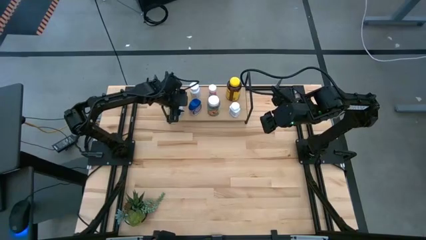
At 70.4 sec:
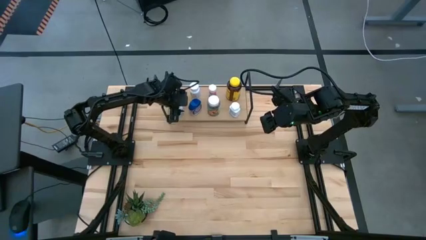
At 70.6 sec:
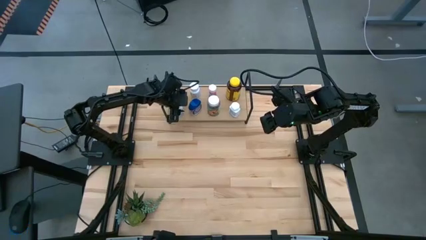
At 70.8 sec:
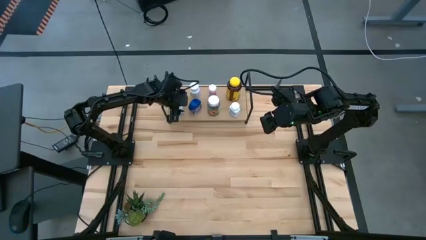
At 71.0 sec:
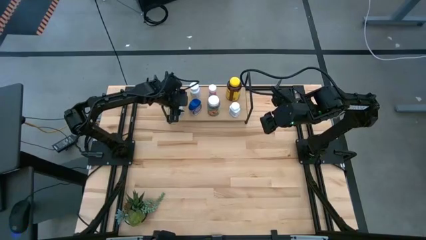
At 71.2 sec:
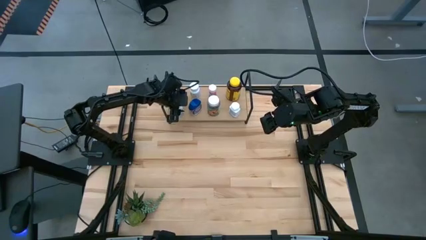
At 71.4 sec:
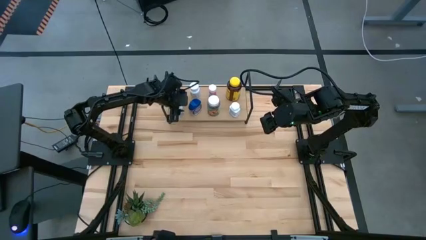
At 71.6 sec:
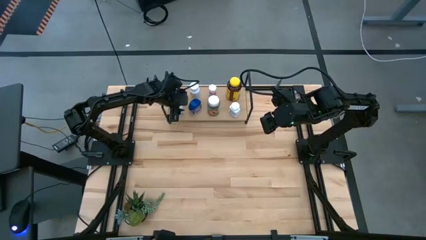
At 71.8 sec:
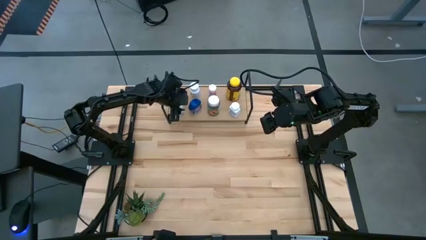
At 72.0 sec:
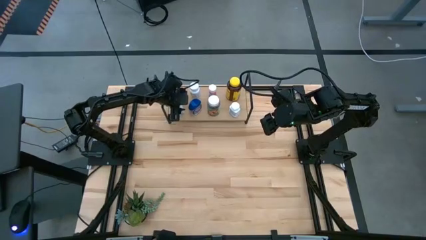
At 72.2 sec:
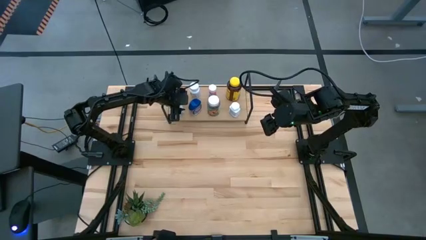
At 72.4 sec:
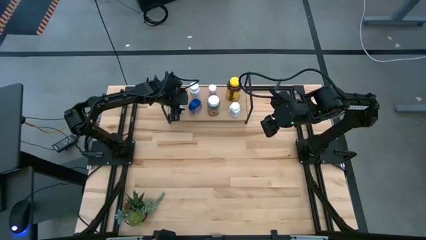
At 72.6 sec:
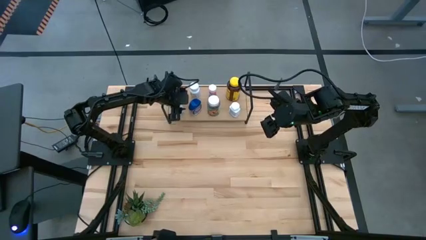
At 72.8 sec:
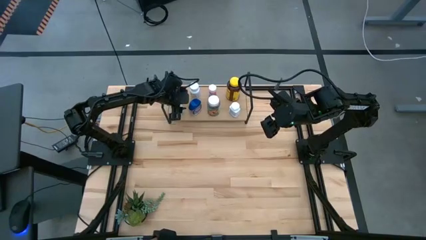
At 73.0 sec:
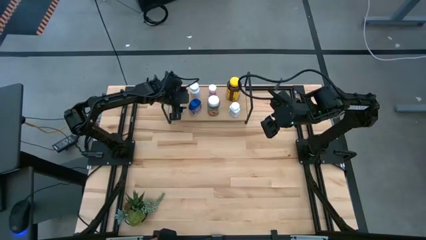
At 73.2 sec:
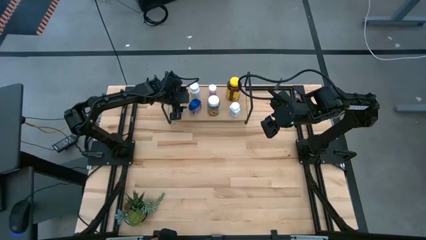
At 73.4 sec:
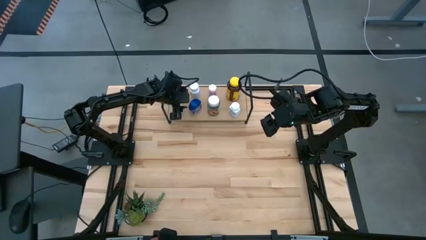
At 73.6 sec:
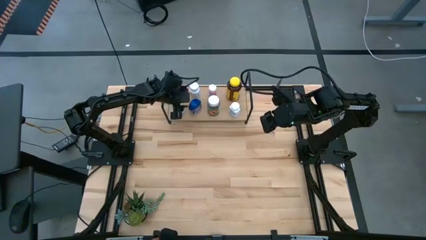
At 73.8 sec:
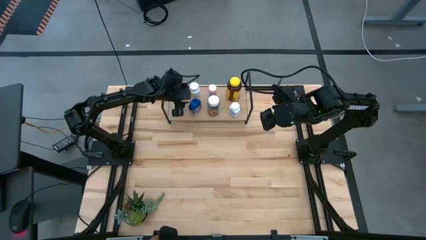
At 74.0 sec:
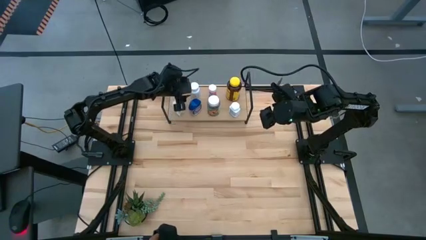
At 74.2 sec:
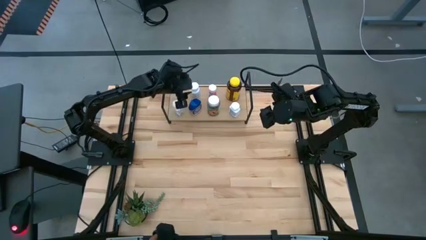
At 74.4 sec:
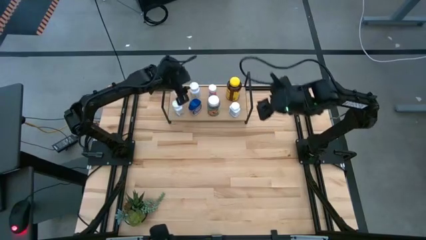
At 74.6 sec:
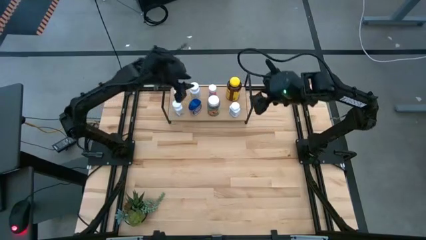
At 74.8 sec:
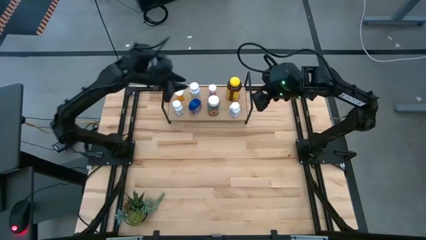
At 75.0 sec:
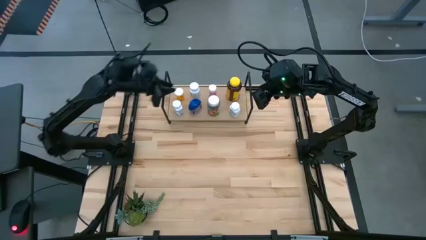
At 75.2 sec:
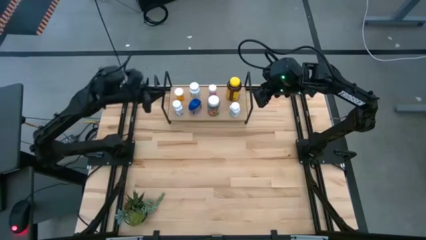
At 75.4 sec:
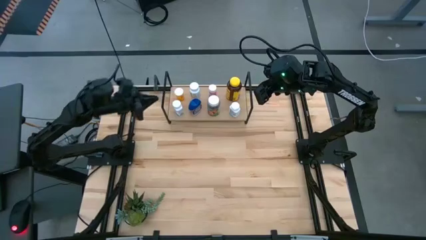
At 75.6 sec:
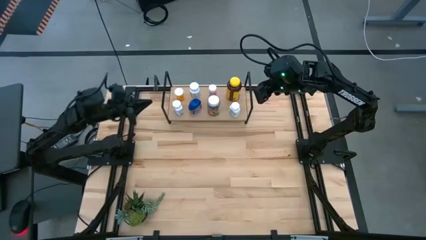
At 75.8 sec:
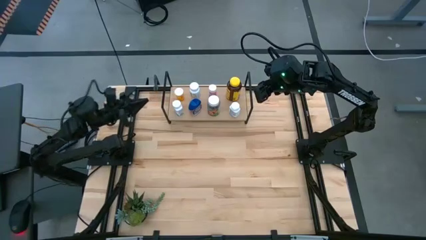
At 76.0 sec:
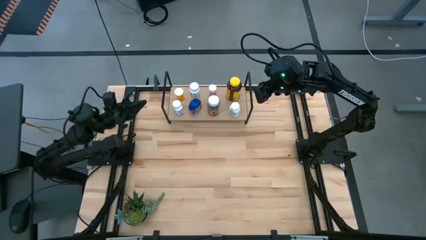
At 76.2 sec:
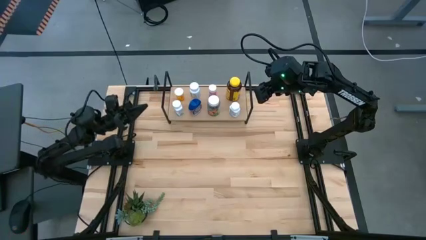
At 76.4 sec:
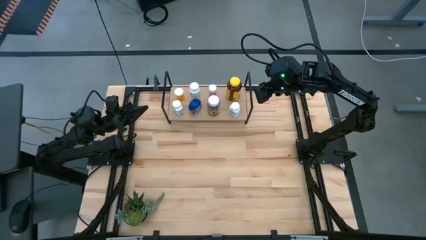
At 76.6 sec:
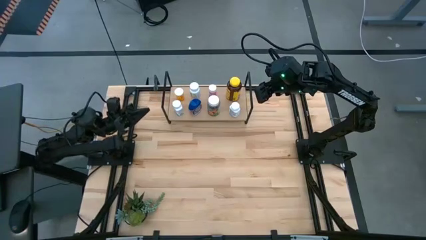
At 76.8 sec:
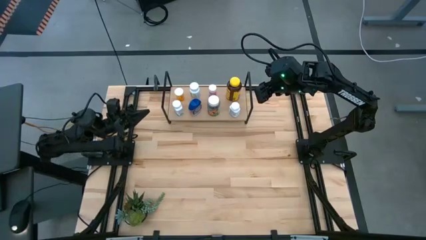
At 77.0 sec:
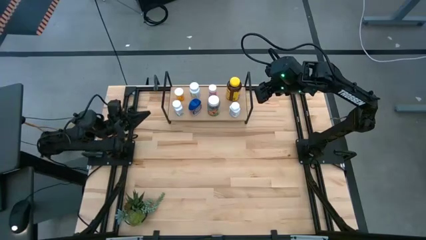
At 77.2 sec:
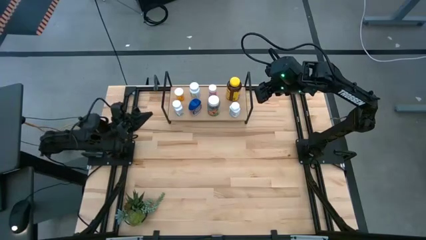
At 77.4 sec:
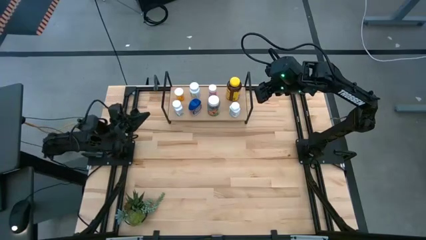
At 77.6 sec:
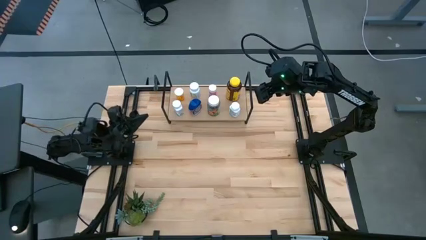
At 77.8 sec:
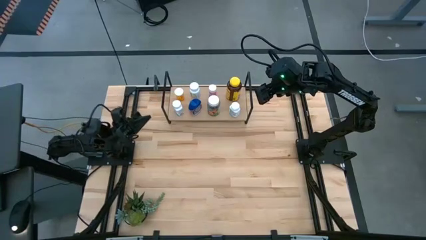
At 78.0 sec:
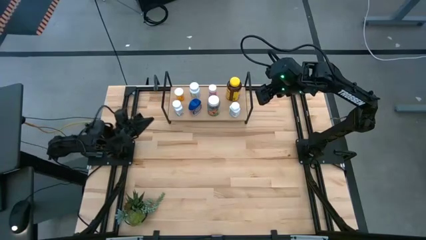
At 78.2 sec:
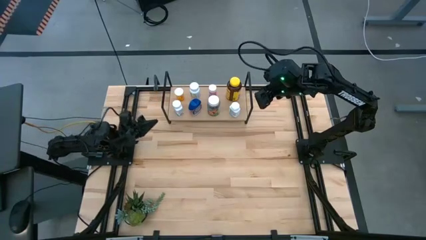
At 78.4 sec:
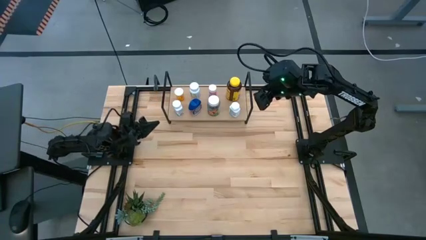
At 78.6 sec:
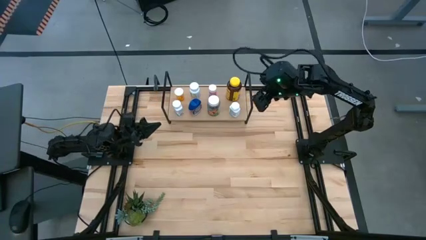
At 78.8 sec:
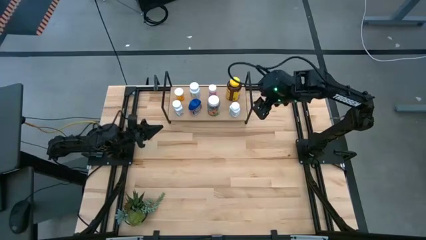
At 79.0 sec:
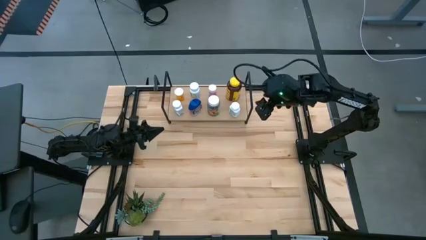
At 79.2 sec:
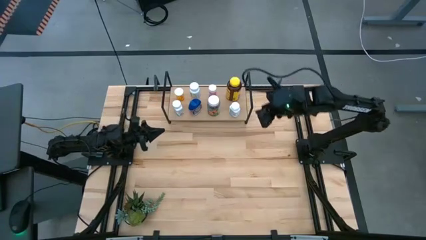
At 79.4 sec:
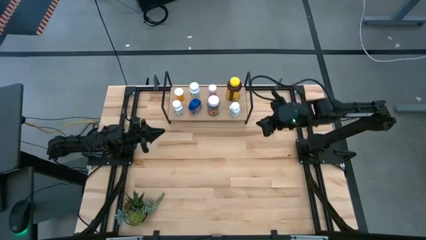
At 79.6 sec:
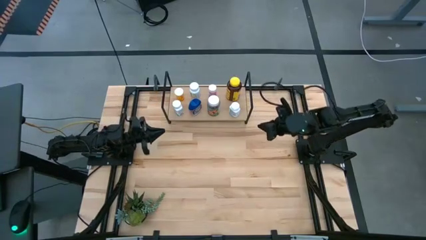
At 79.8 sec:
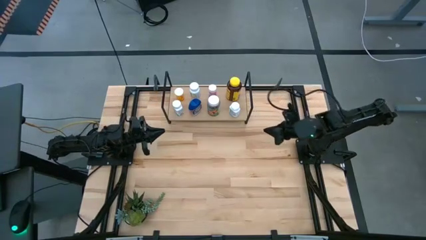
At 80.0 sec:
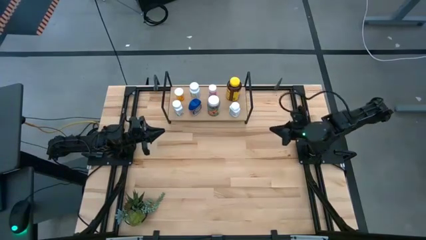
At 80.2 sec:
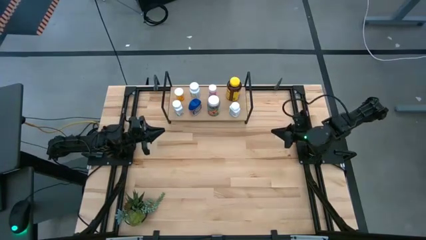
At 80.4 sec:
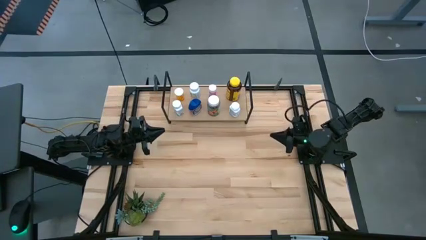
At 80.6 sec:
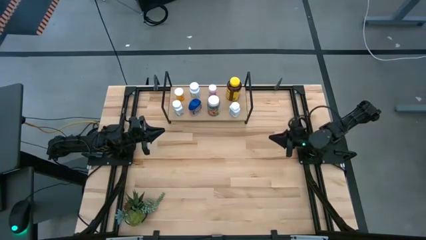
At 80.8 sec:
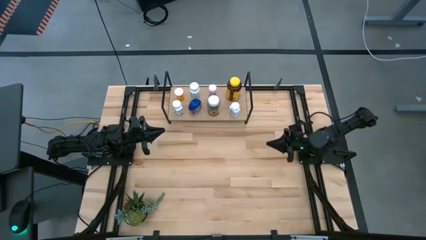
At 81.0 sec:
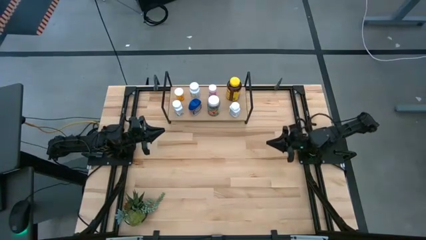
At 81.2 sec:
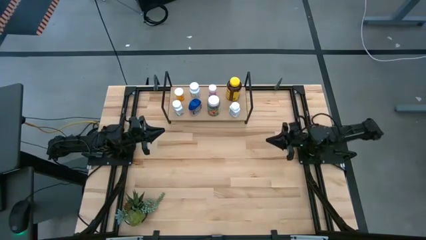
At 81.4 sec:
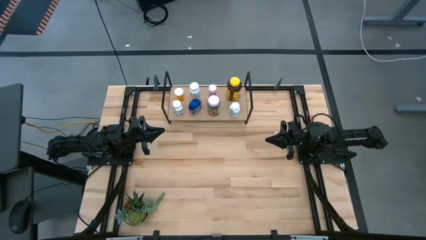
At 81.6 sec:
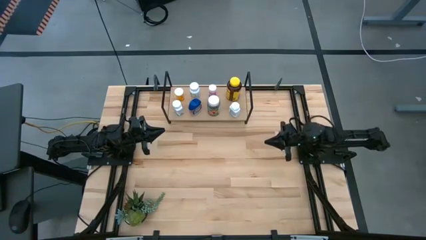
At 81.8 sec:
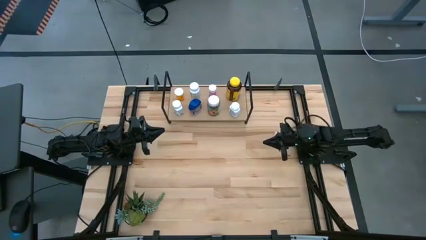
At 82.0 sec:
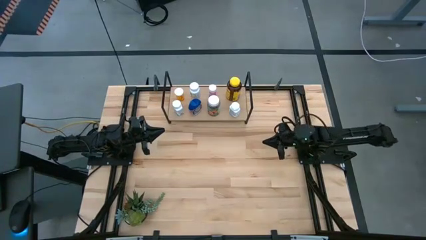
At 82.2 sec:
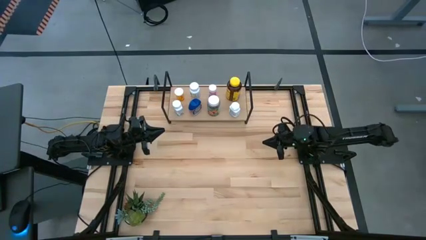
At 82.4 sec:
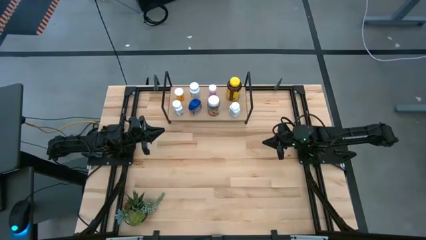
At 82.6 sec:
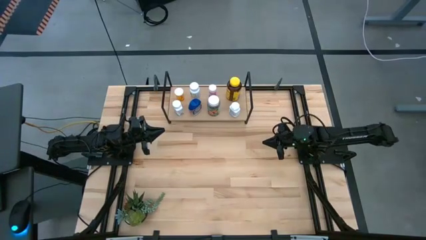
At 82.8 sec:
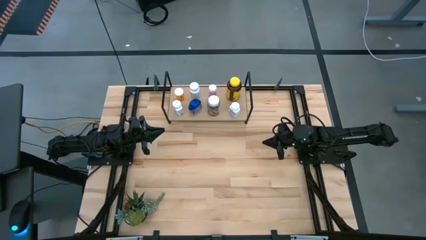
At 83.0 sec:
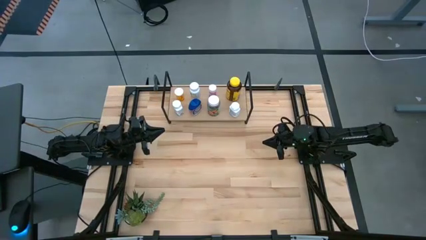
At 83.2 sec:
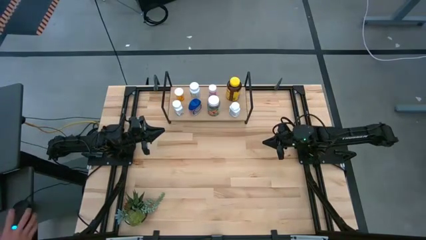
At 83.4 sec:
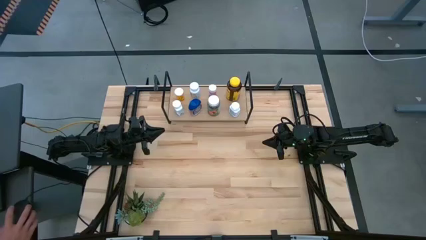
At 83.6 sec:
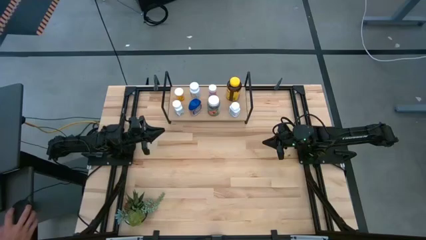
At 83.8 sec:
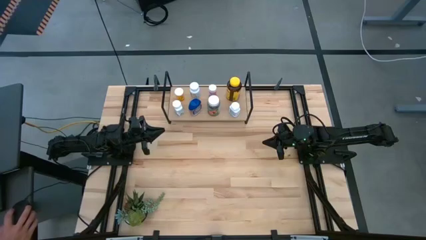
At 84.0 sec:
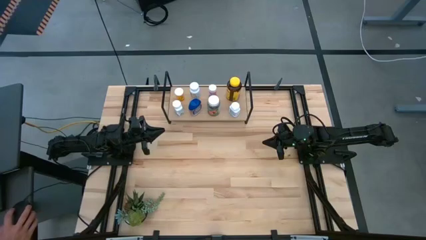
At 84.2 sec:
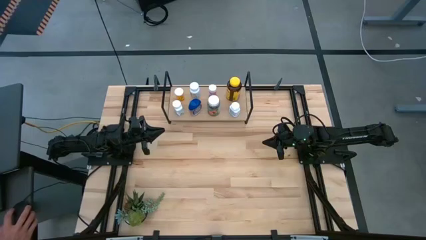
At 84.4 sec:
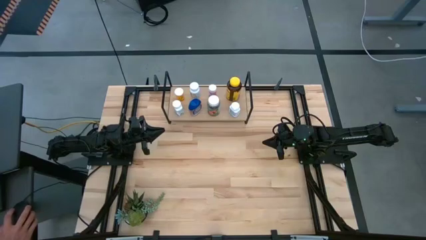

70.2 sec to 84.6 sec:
Task: Pick and place medicine bottles onto shelf by color
Return to Home Position

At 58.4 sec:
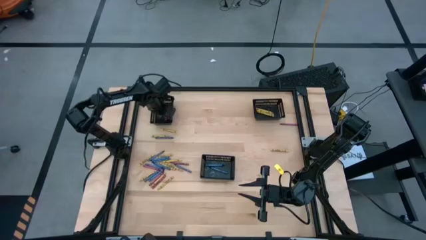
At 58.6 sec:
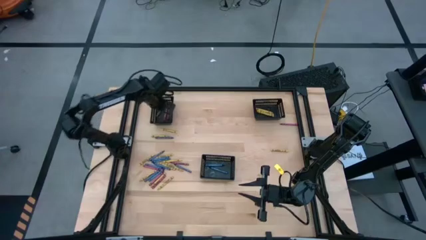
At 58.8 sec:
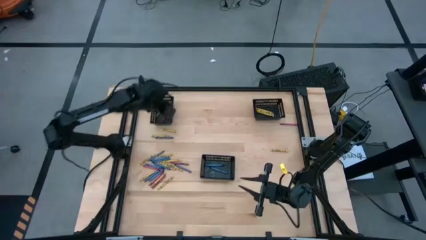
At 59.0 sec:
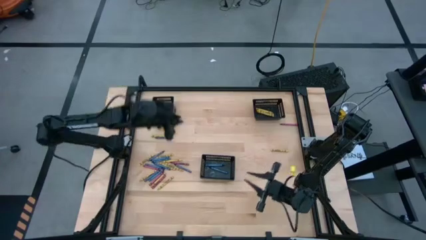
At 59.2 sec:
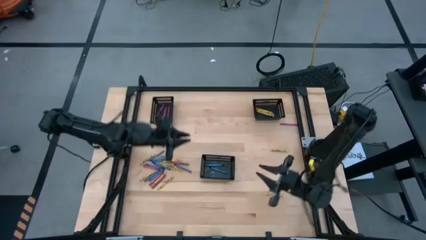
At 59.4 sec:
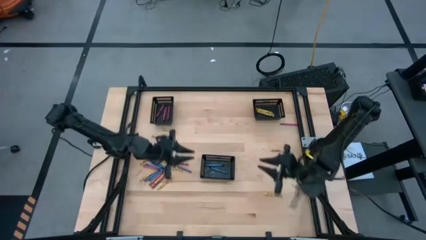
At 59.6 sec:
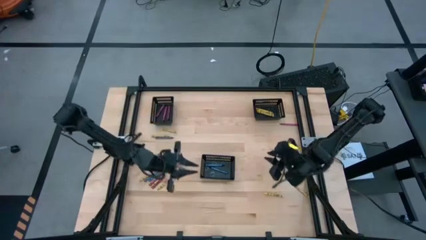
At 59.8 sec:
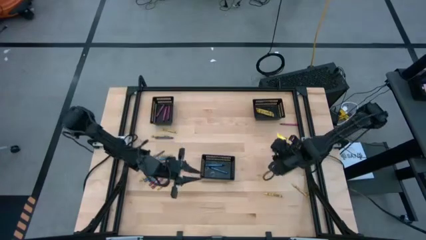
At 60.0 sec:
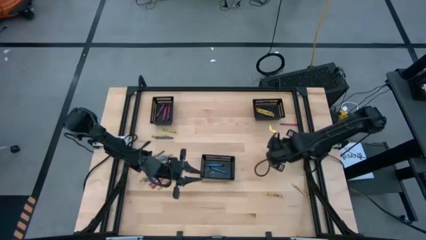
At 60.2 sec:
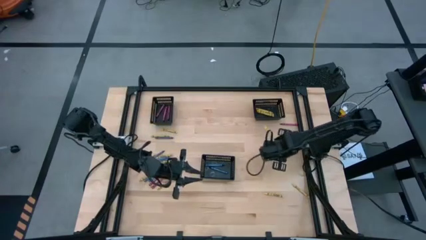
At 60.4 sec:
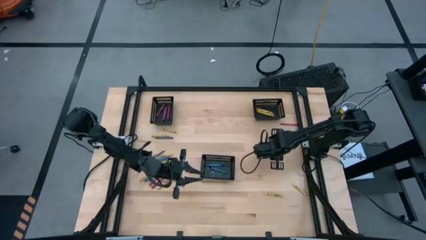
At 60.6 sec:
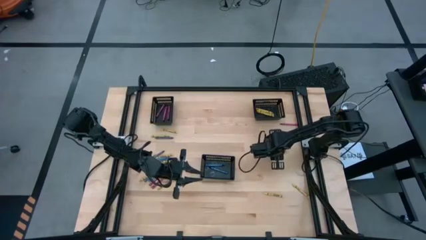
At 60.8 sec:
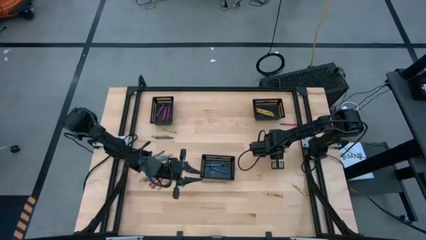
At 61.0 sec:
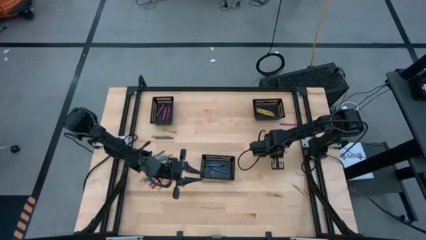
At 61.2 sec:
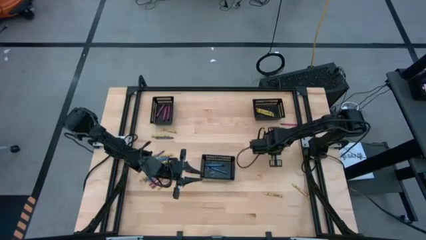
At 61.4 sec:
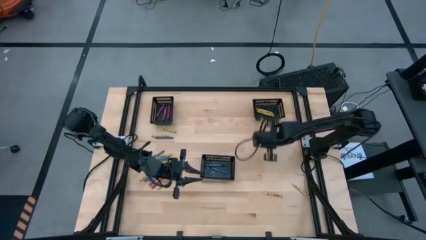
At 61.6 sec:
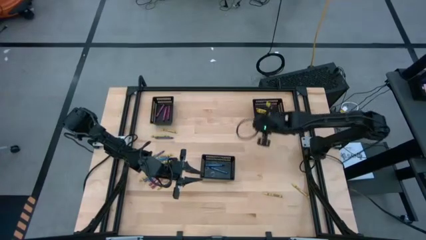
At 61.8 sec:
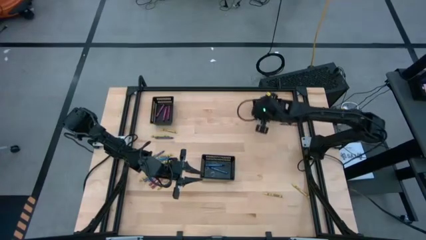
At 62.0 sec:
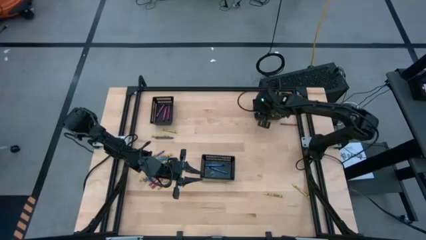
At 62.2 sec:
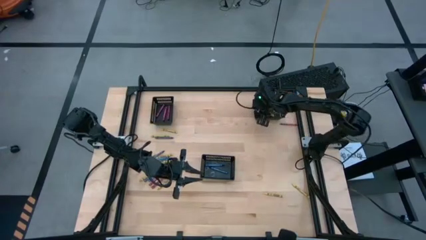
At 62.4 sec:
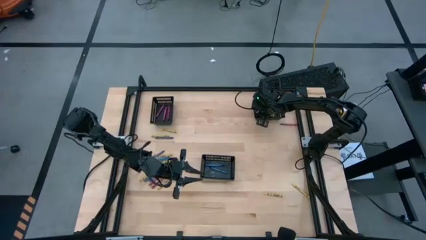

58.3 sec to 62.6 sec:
Task: Sort crayons
Put the yellow crayon into the top right black bin
